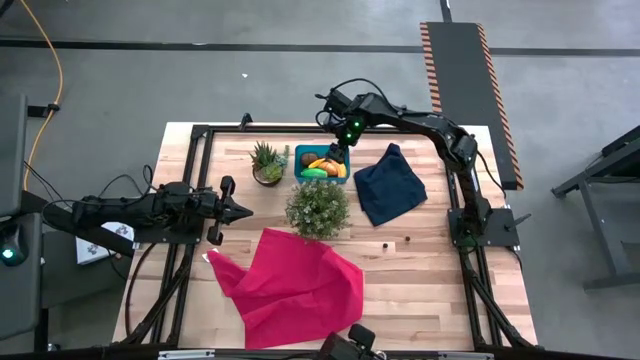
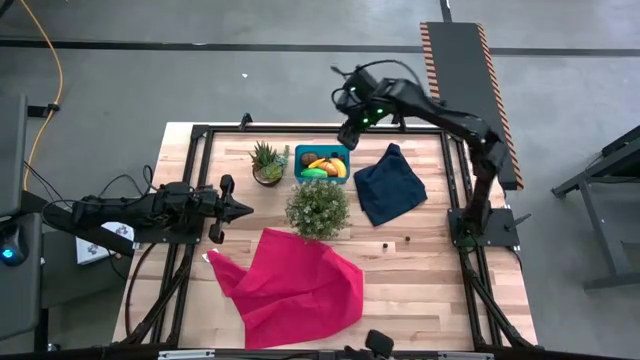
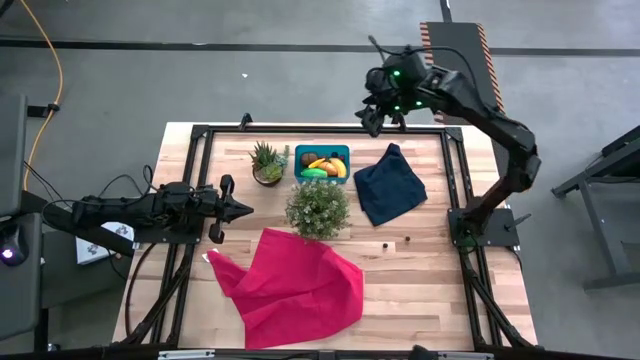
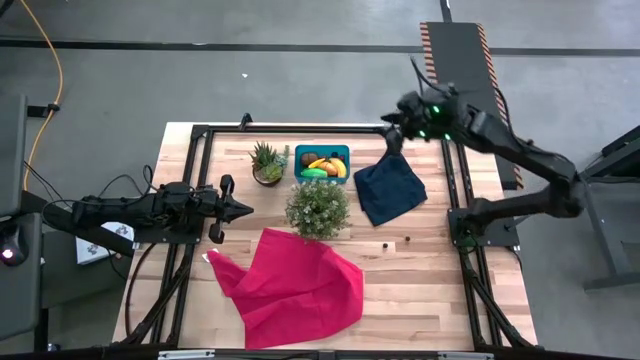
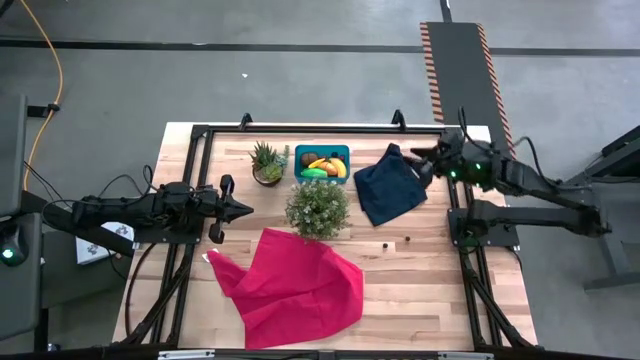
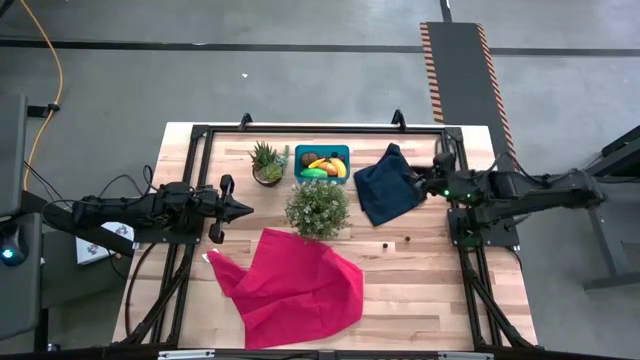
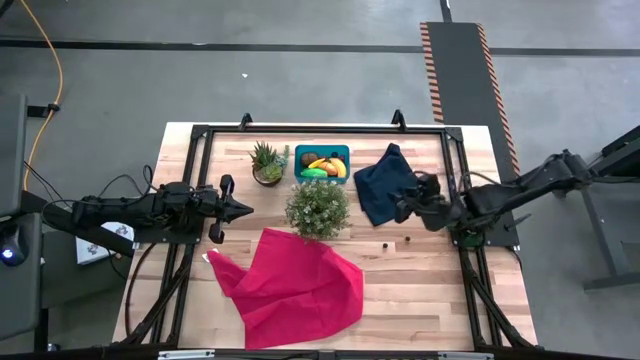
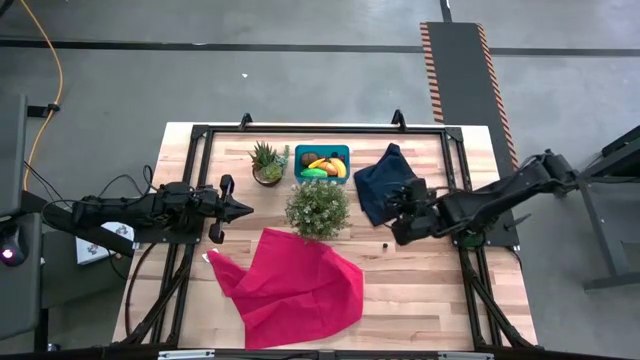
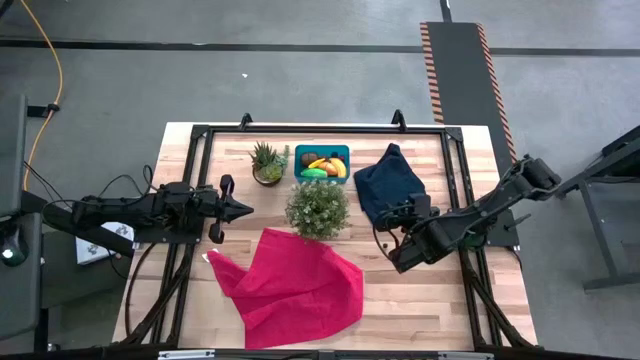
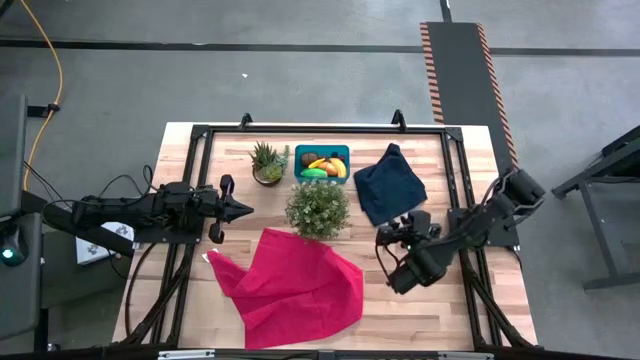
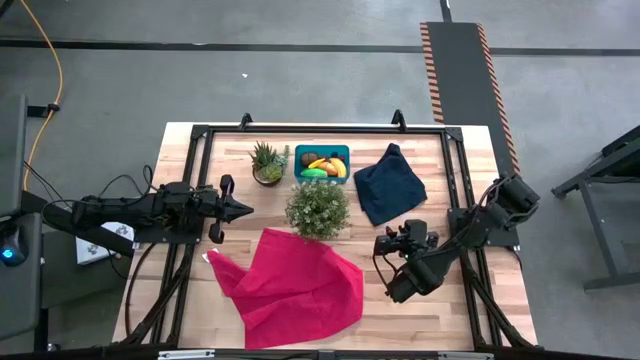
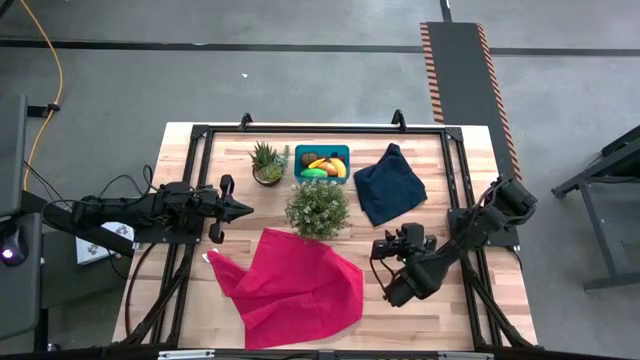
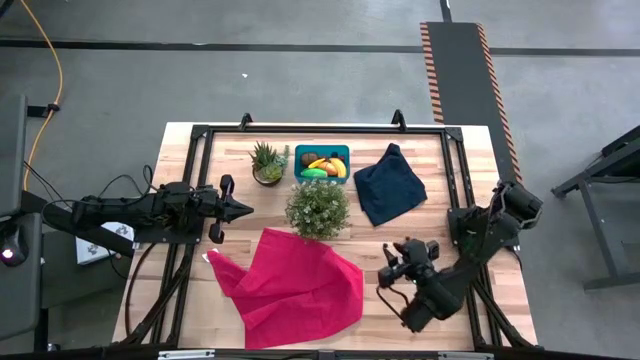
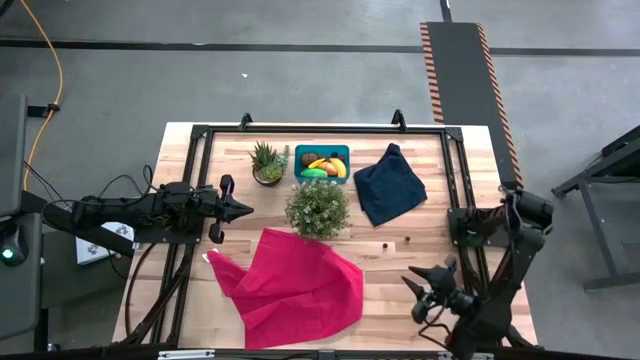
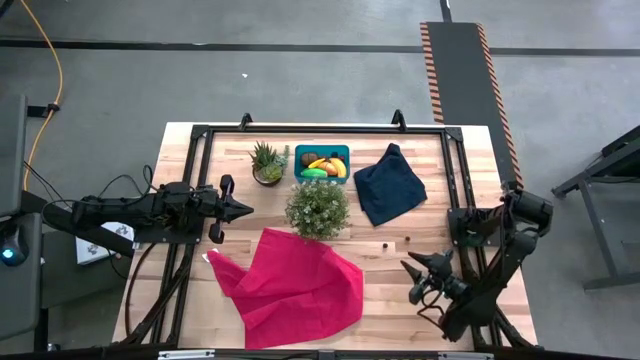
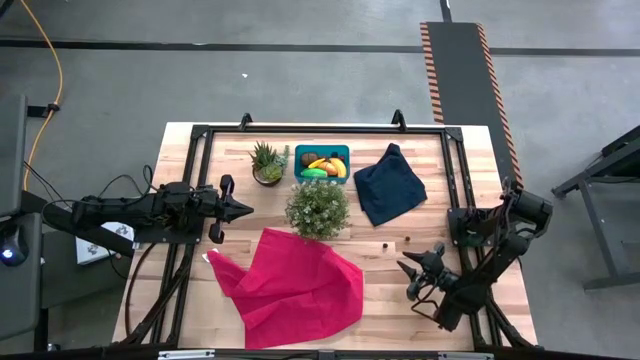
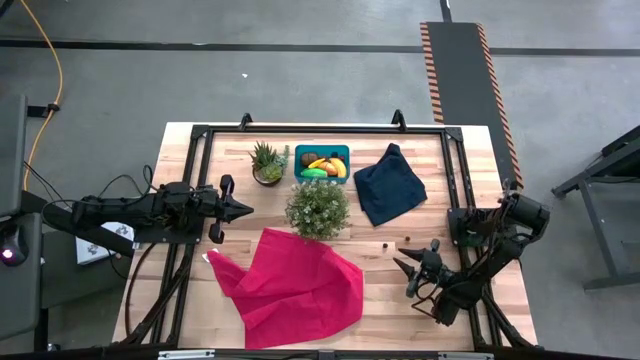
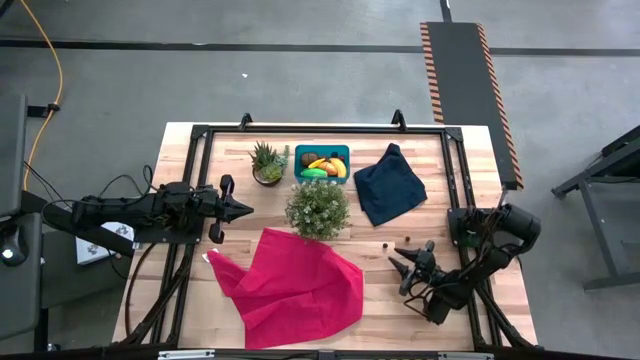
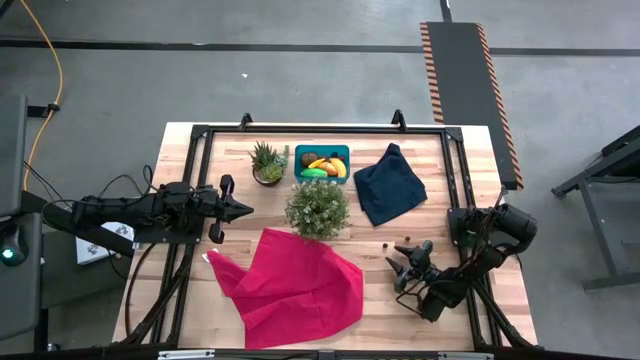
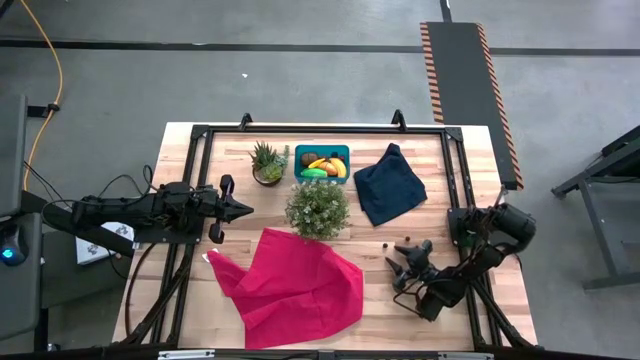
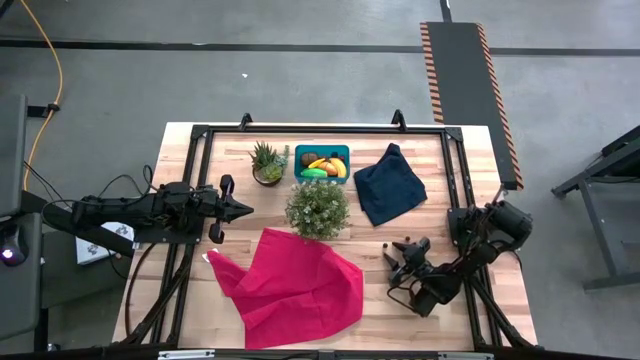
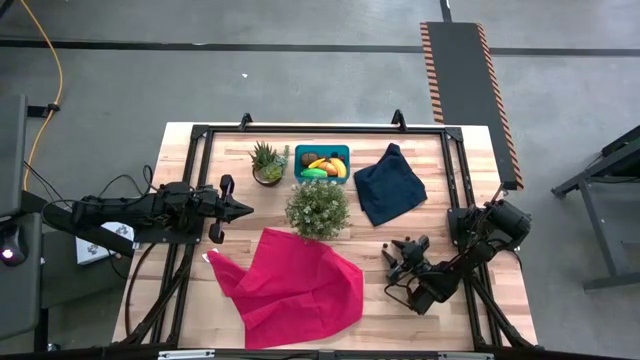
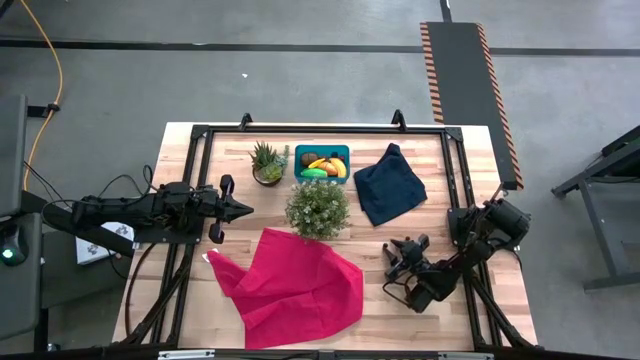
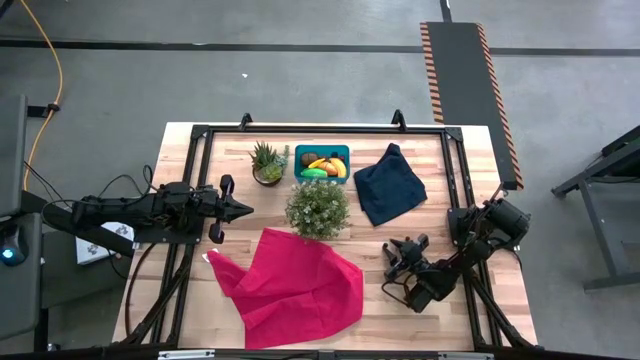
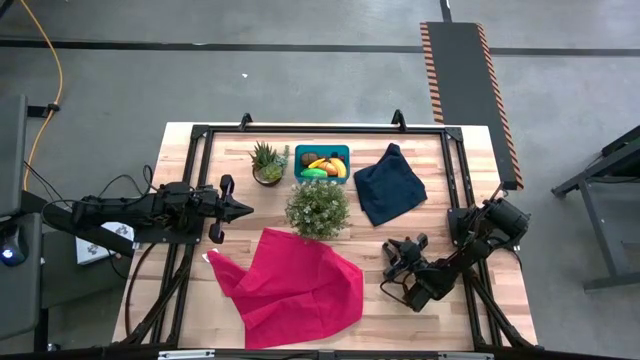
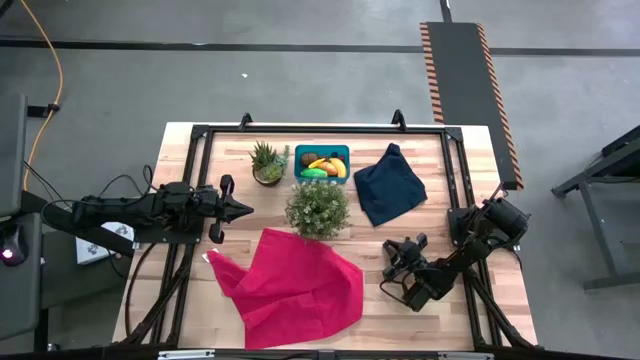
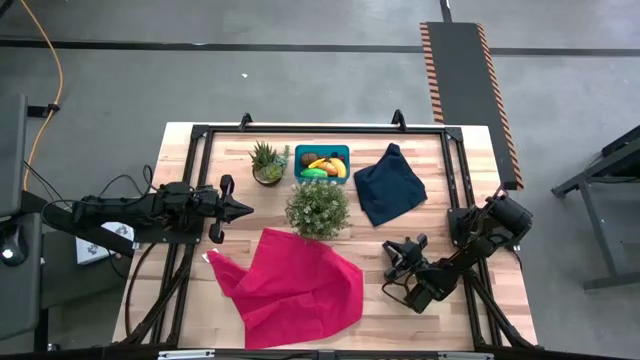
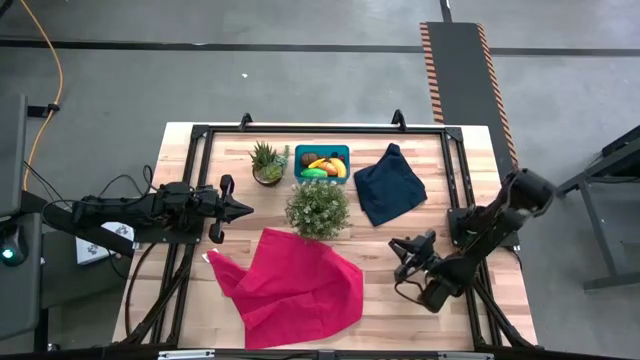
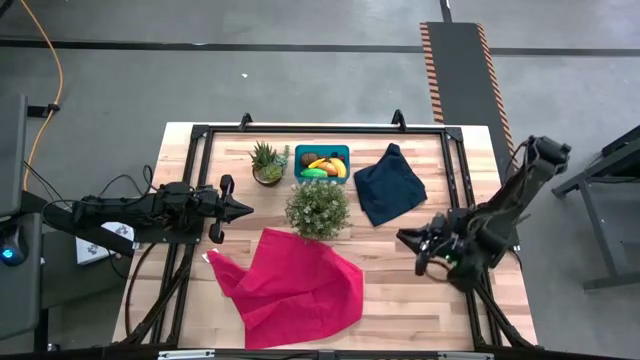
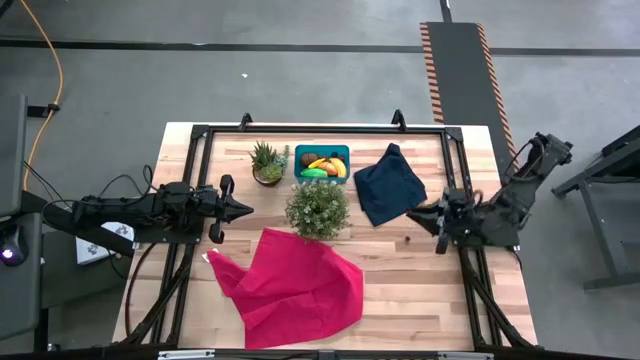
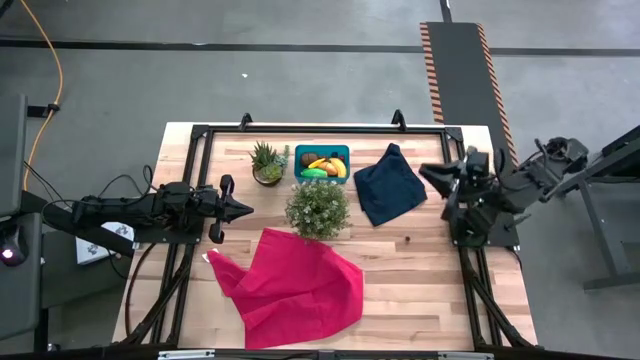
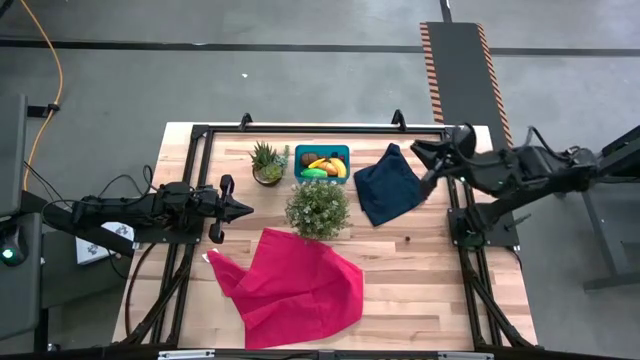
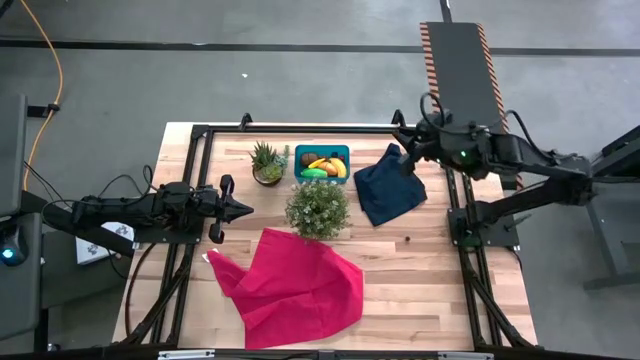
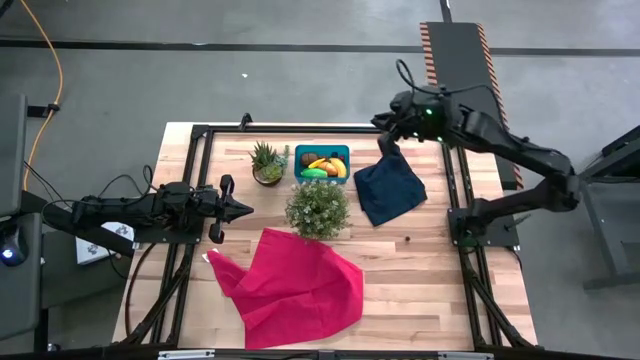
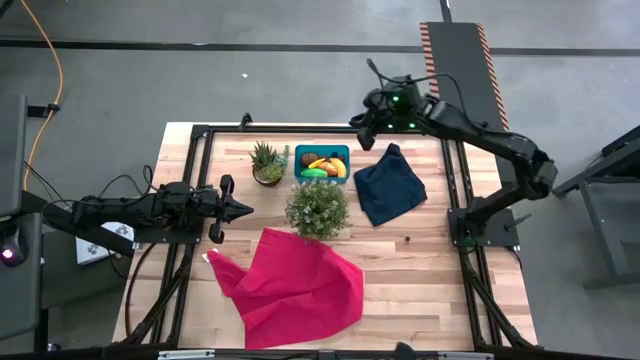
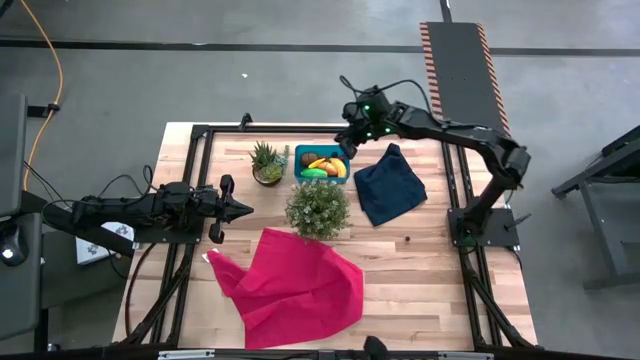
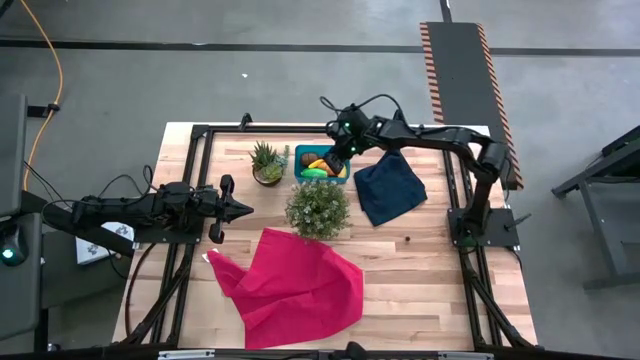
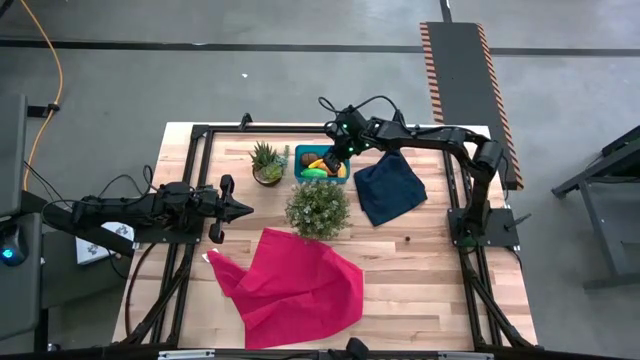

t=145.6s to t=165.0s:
Task: Pick and placing Produce into tupperware
Put the left blueberry into the blue bin
